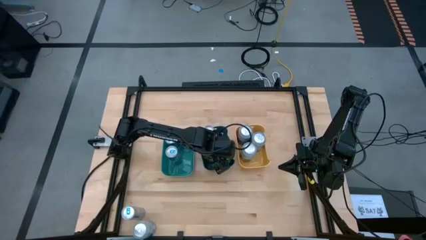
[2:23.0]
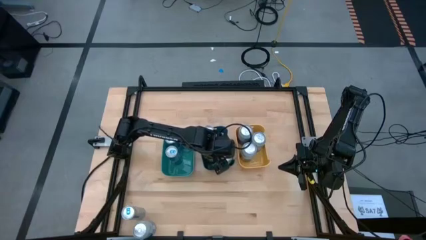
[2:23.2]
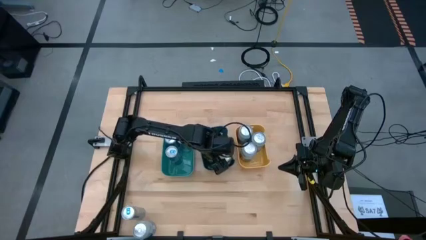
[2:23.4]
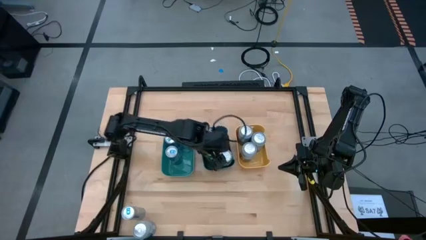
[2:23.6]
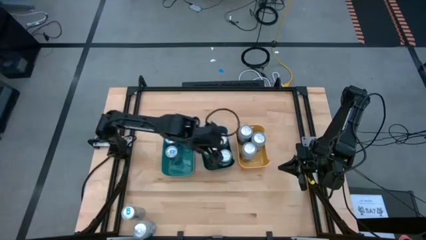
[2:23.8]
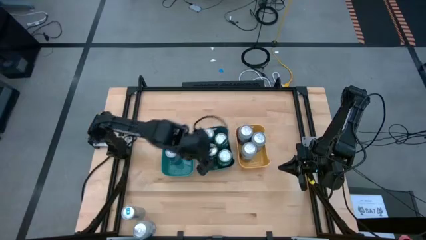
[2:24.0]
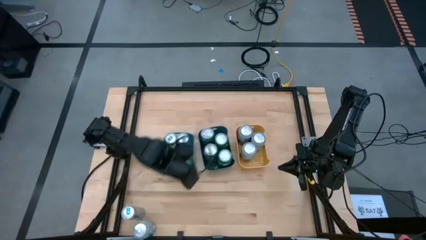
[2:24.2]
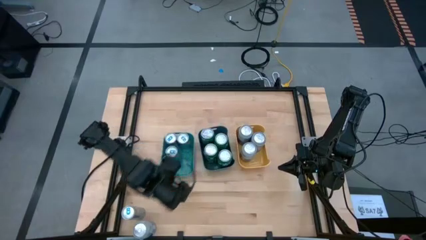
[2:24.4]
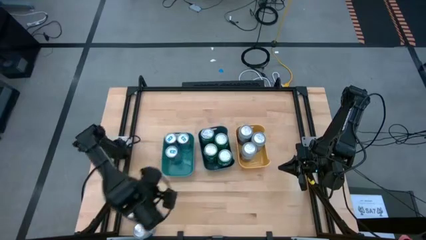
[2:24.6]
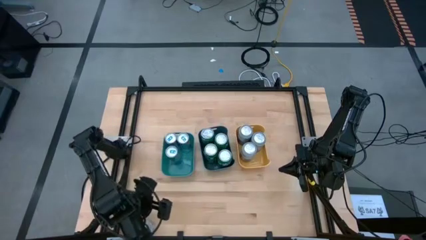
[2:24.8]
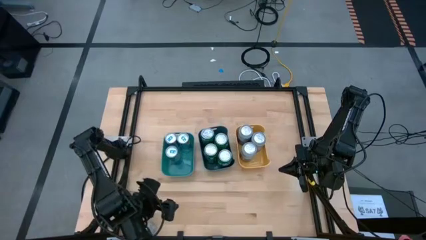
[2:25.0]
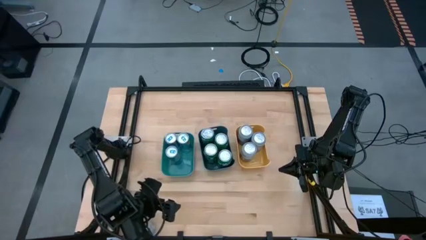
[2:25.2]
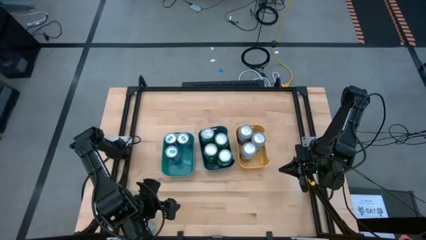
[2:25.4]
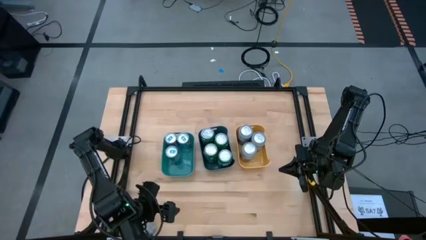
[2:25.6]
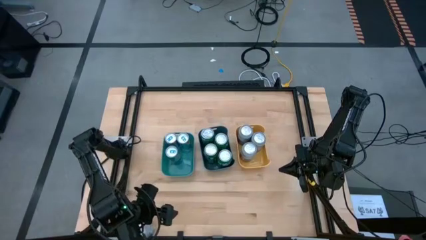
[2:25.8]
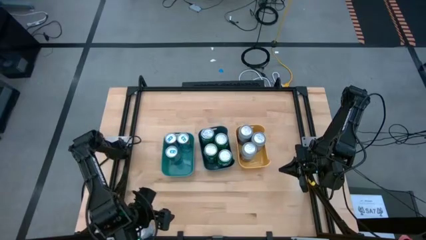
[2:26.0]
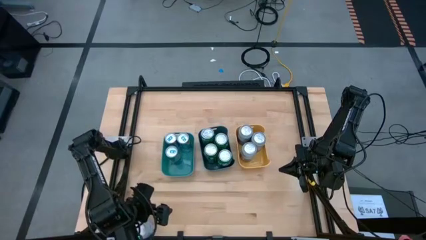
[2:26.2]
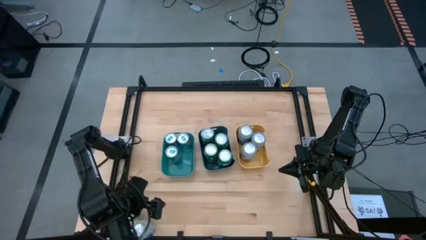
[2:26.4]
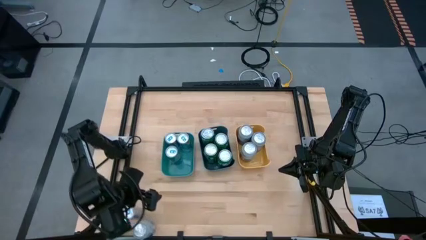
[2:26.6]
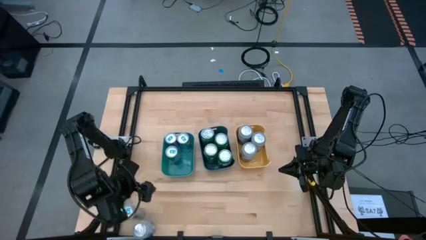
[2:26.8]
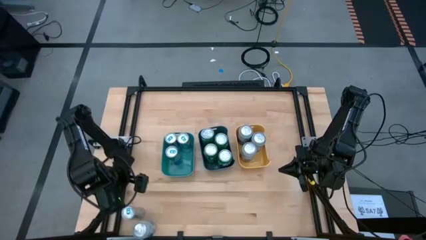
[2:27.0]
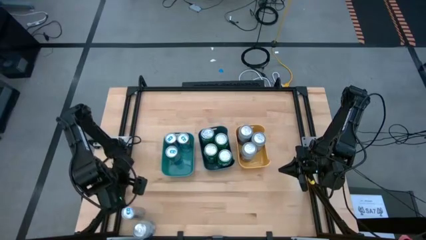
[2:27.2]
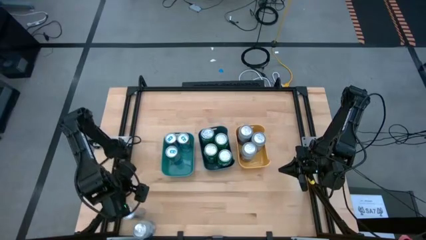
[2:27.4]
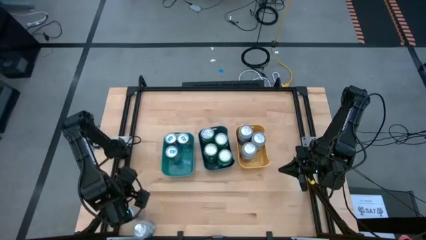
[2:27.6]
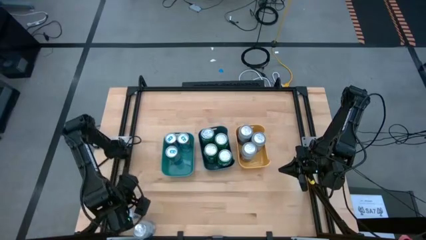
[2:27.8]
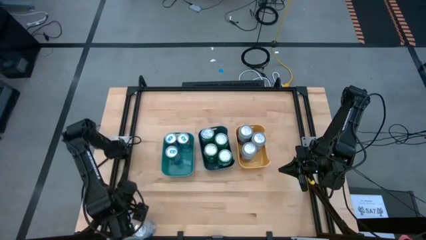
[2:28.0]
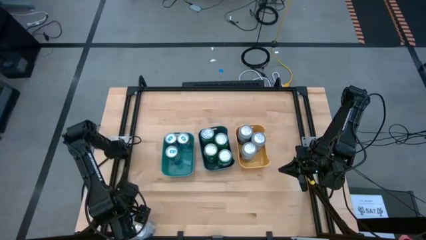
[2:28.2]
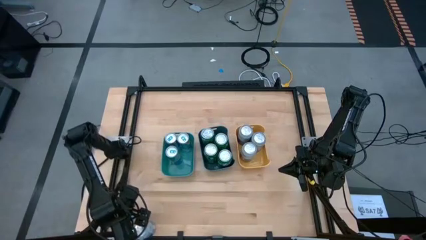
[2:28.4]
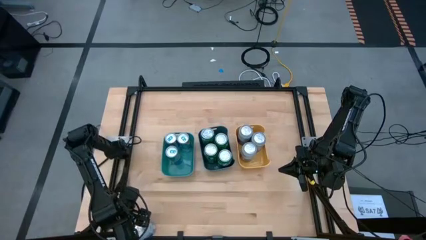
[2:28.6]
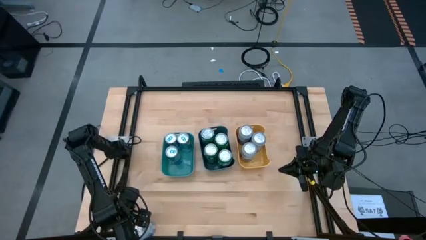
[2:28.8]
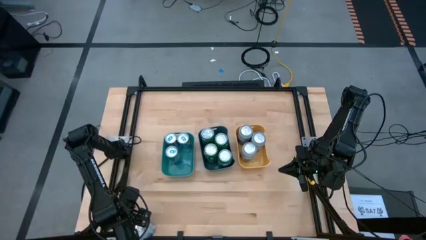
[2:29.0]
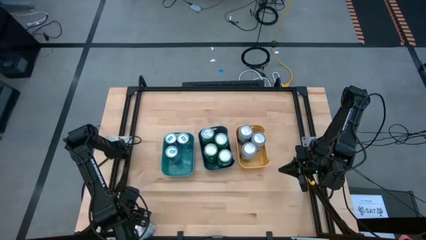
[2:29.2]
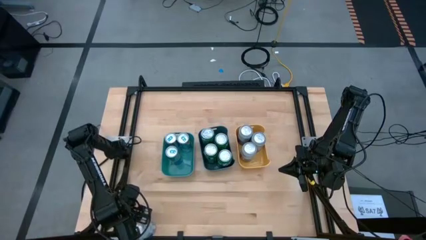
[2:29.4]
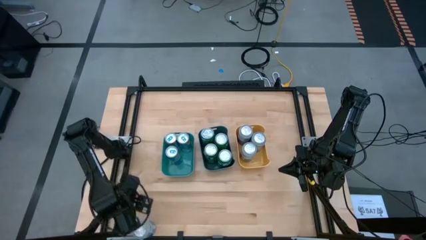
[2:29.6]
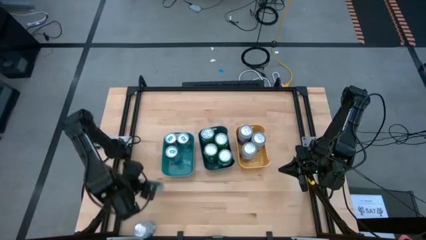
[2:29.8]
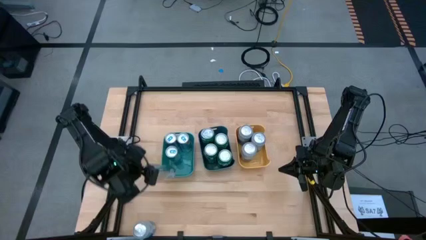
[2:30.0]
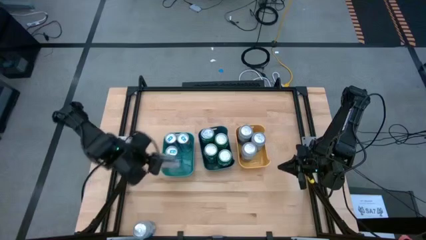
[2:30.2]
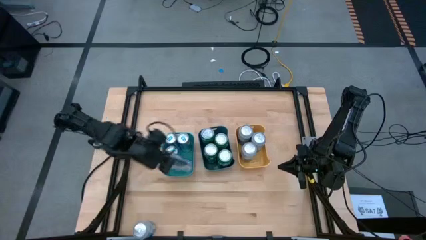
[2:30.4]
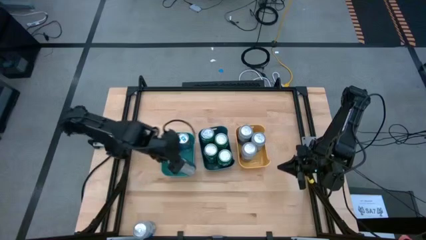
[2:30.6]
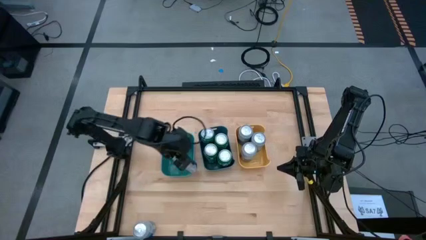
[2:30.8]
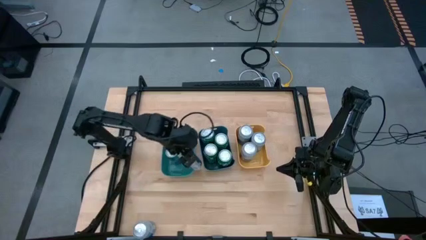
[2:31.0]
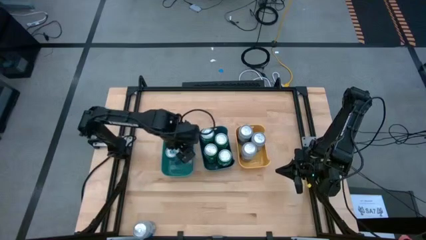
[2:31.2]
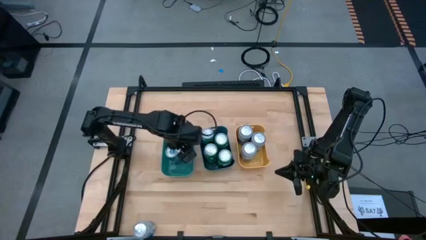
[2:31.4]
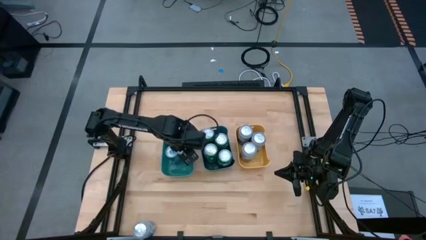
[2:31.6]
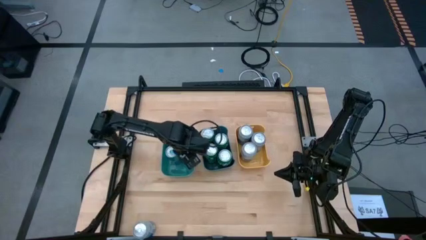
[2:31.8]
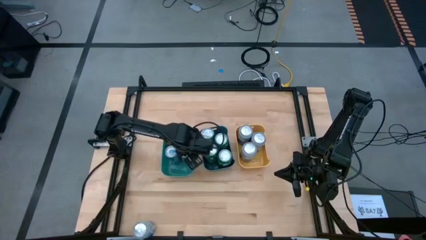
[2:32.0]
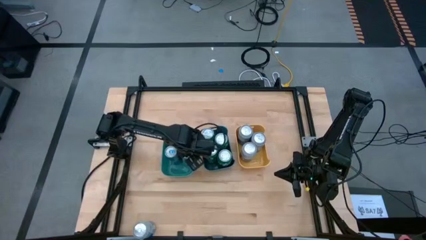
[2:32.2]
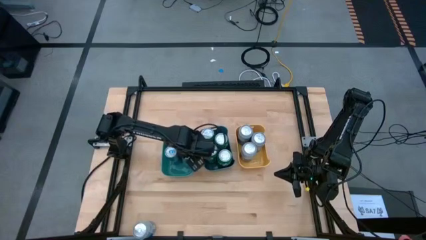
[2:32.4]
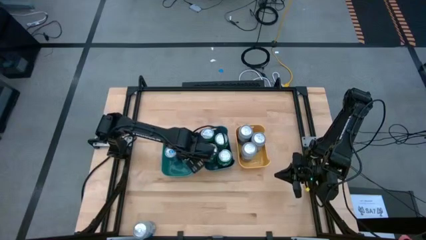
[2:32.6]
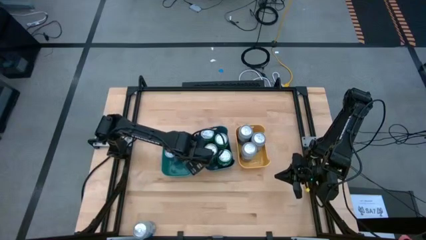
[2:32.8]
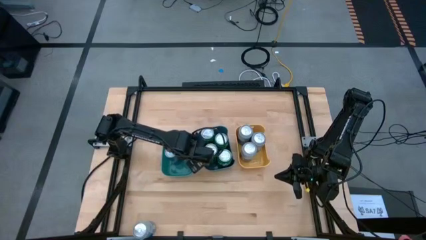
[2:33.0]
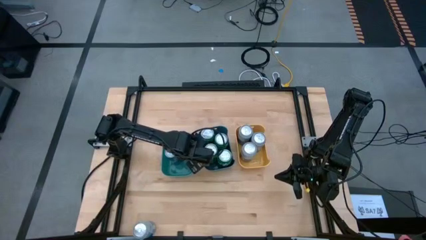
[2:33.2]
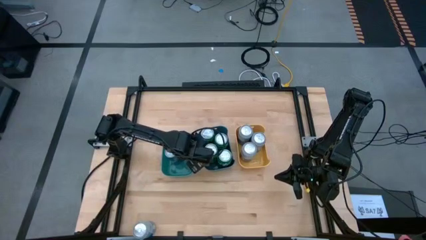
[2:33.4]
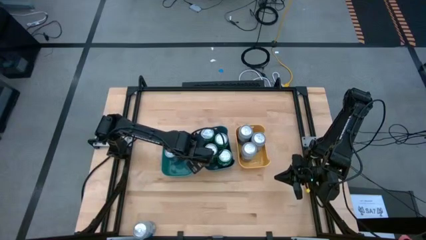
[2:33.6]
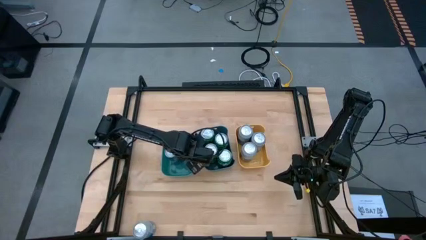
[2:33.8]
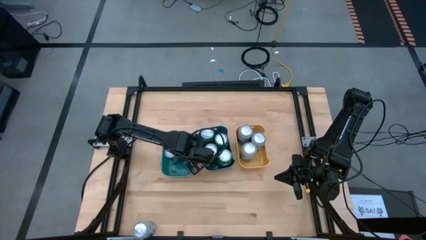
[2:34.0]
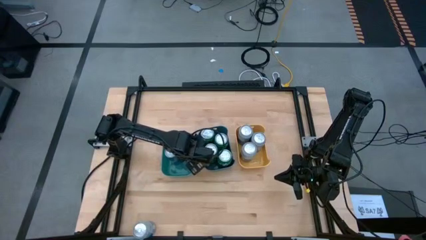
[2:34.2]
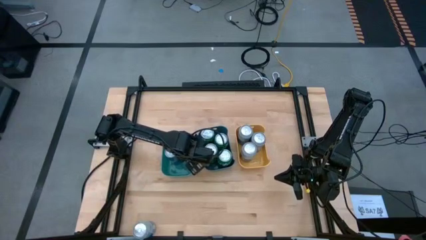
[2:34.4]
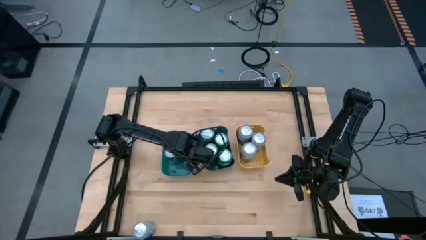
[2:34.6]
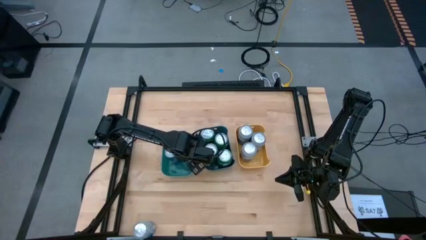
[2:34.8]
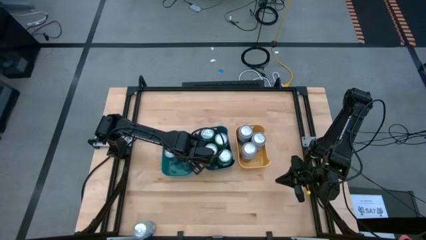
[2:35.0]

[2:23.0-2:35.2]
Task: Sort soda cans
Put the white/blue soda can into the green bin

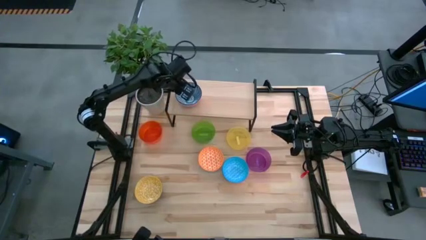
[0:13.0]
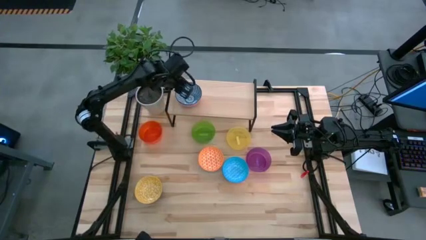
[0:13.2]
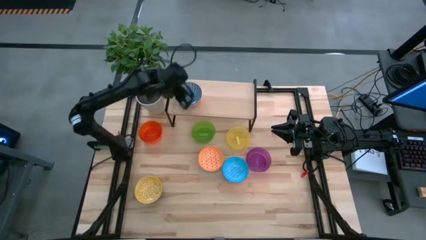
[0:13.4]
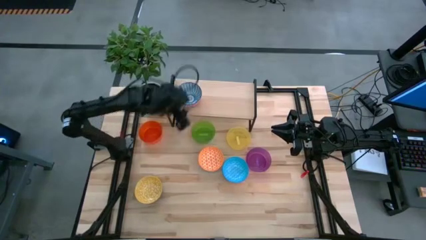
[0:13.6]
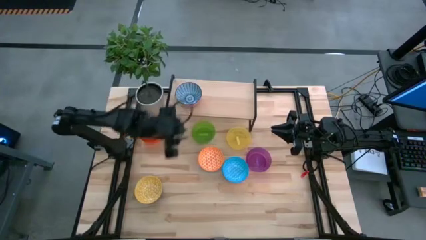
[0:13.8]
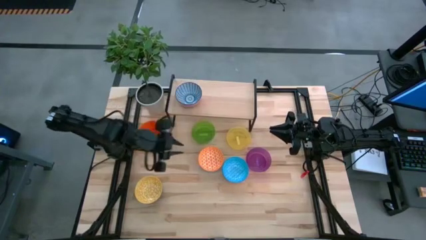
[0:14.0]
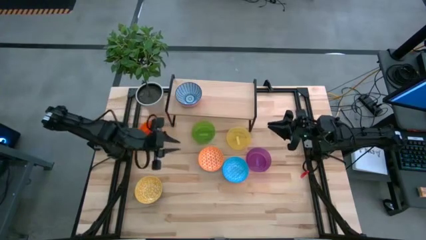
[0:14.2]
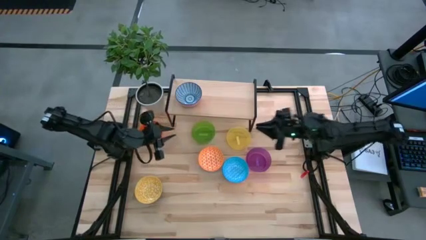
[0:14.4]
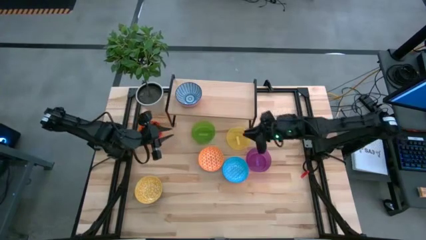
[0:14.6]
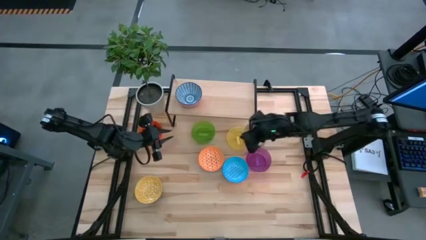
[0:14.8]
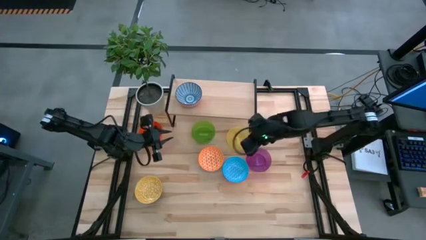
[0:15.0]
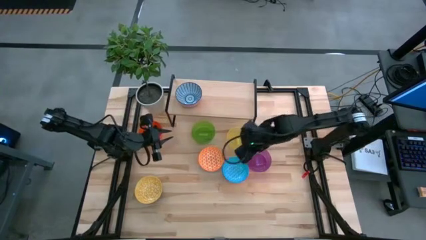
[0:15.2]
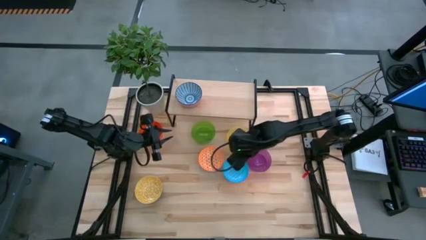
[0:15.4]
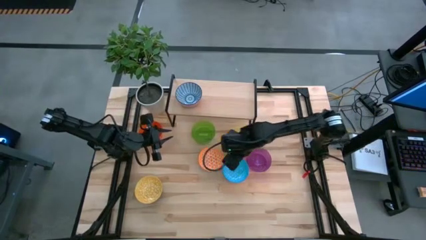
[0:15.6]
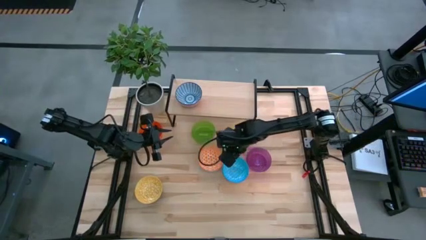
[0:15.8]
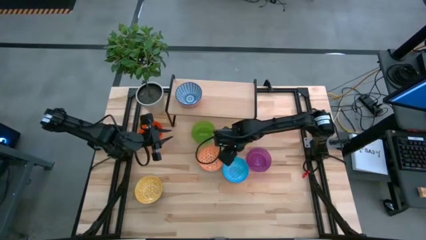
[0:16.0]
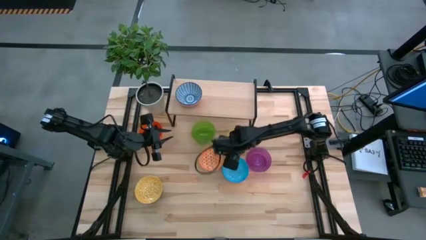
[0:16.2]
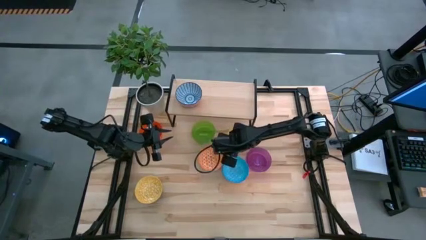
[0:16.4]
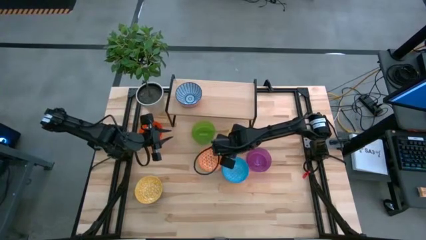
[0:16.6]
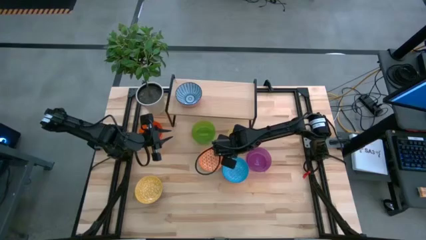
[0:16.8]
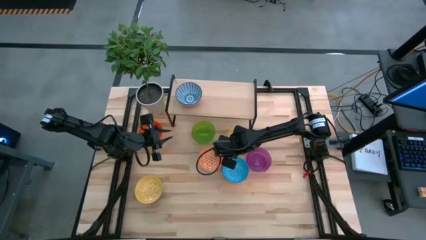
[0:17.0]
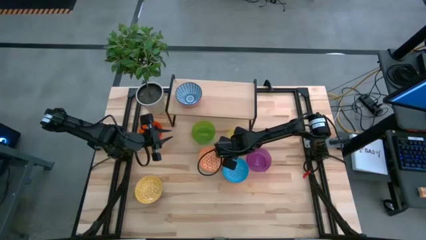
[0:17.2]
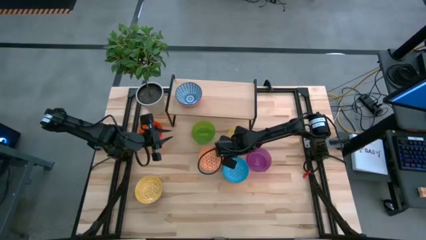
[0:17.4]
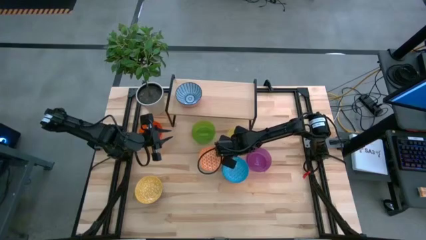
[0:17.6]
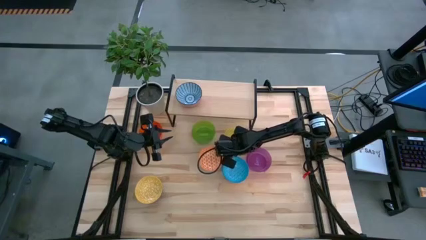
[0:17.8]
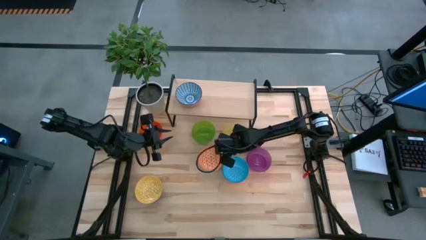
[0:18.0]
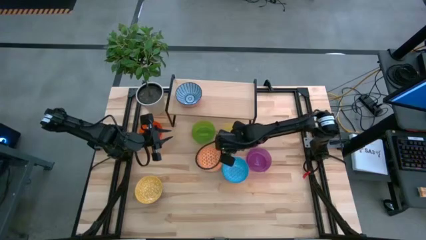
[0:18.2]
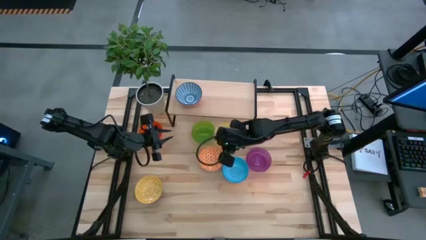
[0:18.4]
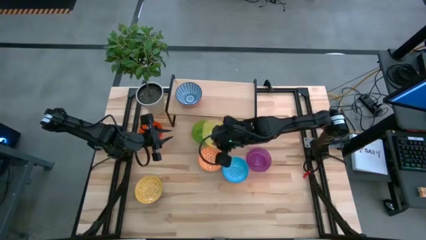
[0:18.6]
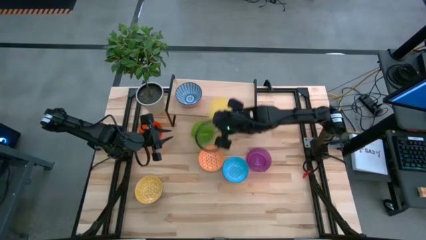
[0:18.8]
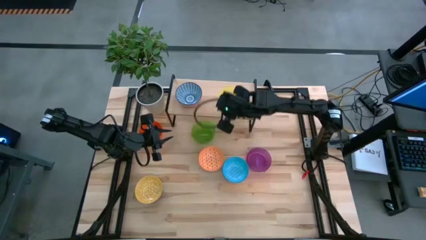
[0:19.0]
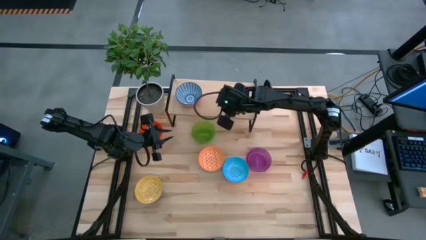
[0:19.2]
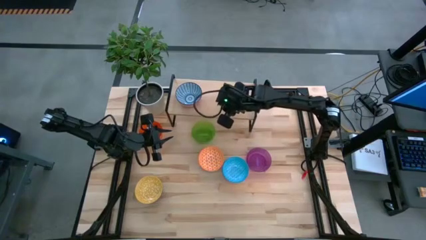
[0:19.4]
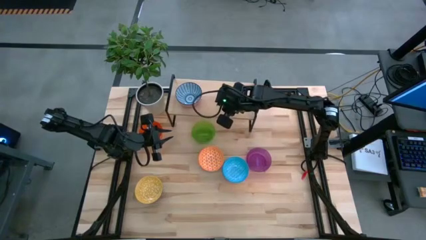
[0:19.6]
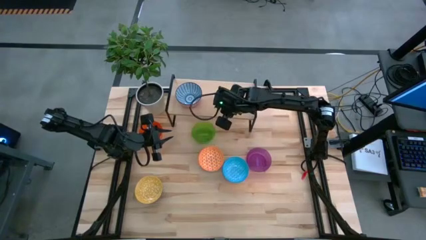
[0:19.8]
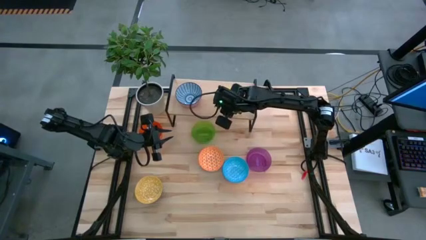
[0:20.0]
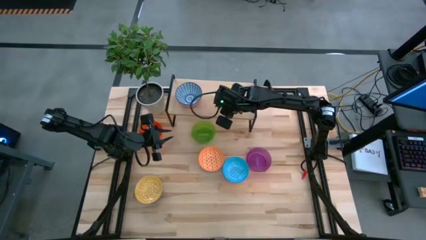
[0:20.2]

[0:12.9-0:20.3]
Task: Place and stack bowls onto a shelf
Put the yellow bowl on the shelf
